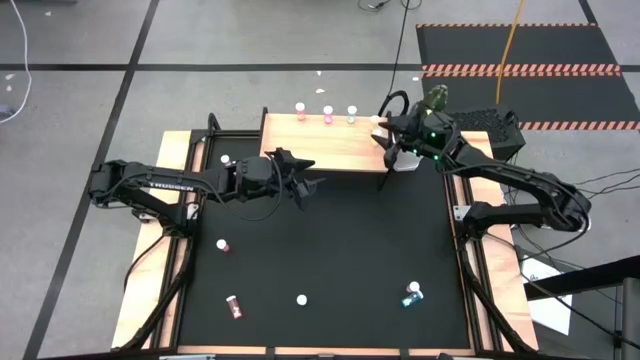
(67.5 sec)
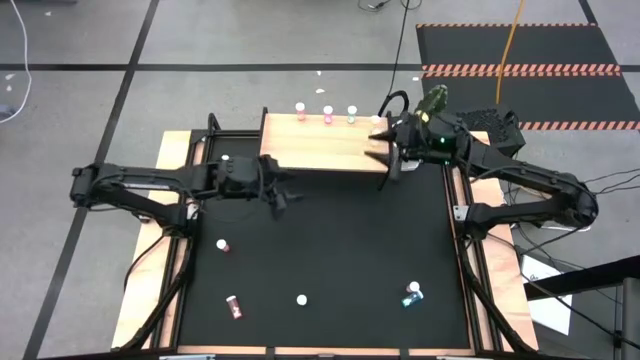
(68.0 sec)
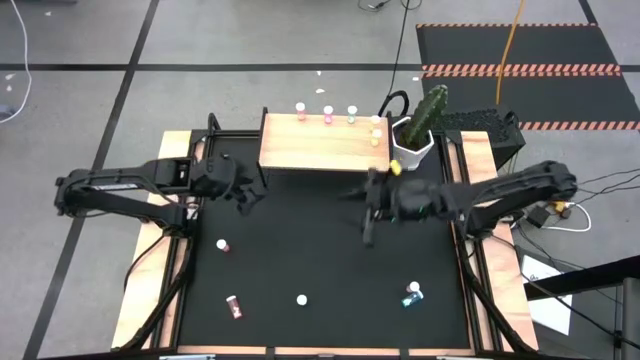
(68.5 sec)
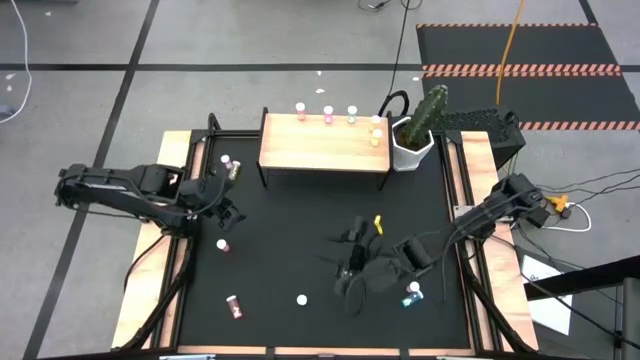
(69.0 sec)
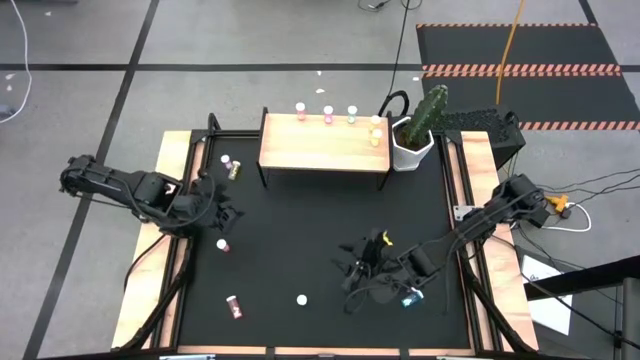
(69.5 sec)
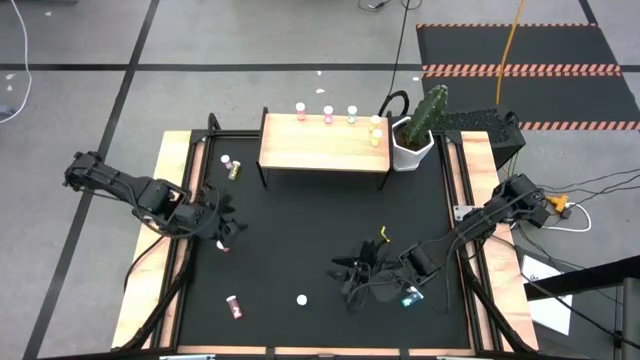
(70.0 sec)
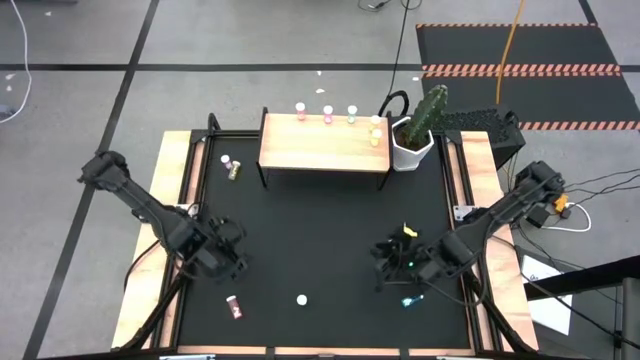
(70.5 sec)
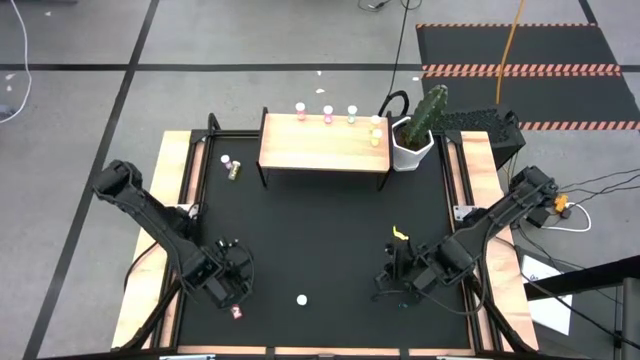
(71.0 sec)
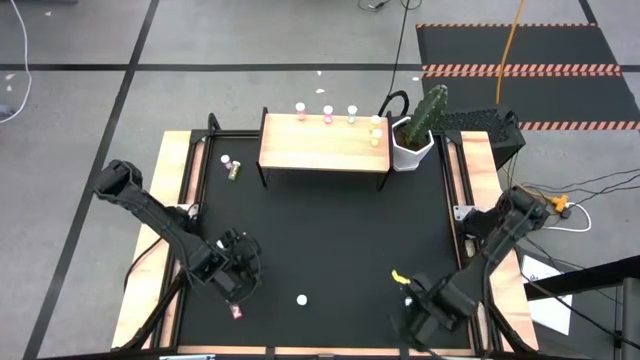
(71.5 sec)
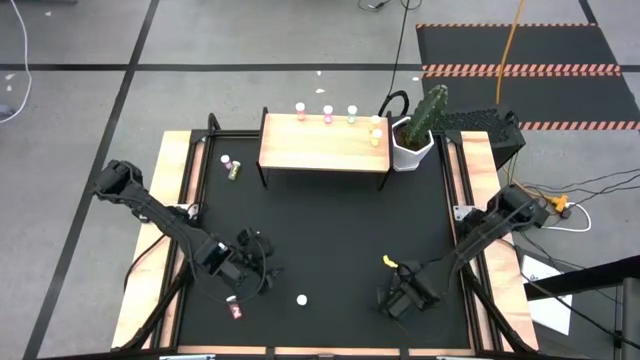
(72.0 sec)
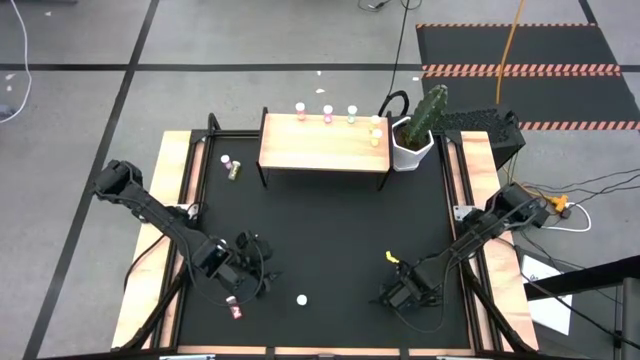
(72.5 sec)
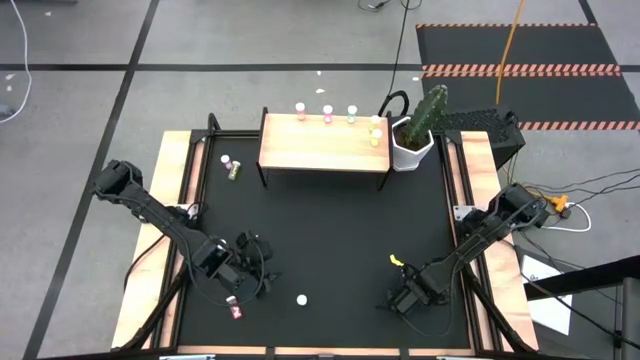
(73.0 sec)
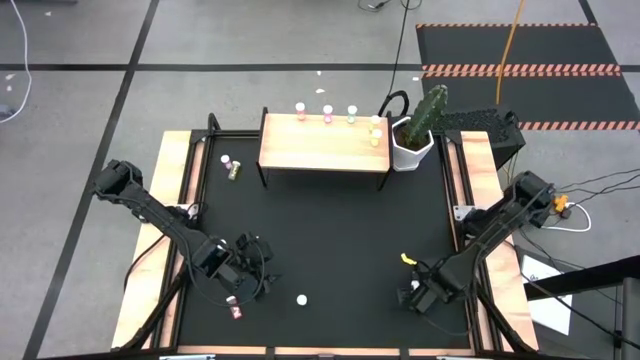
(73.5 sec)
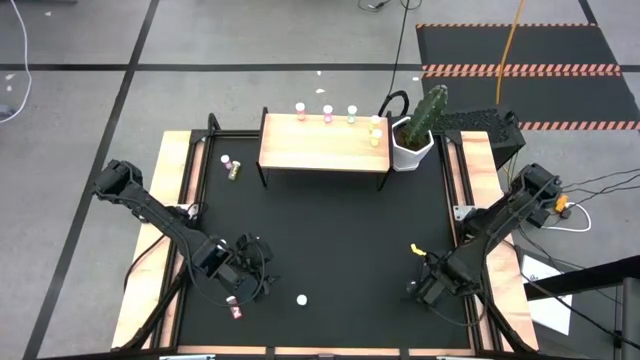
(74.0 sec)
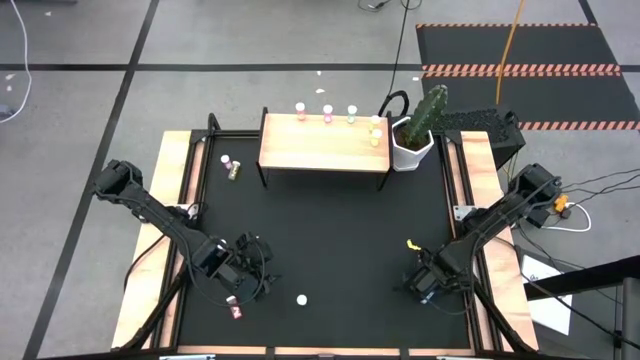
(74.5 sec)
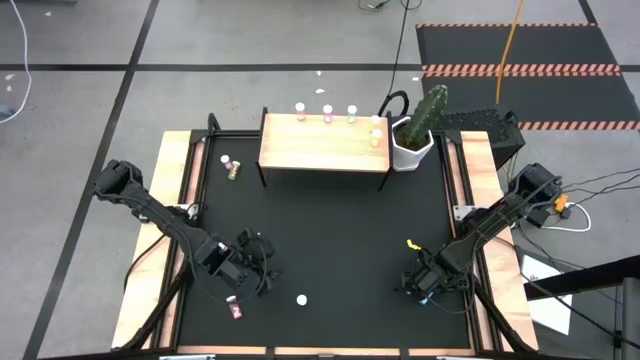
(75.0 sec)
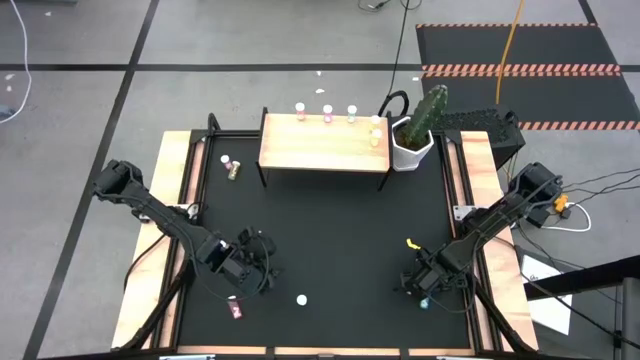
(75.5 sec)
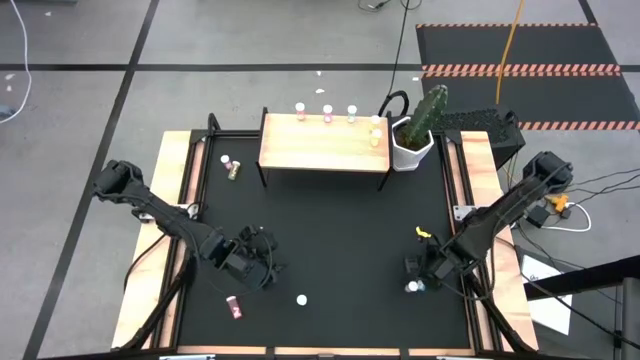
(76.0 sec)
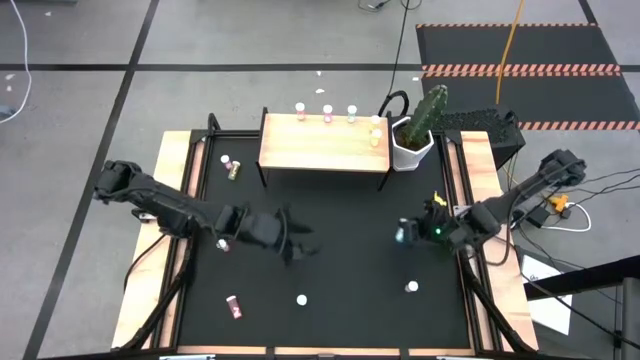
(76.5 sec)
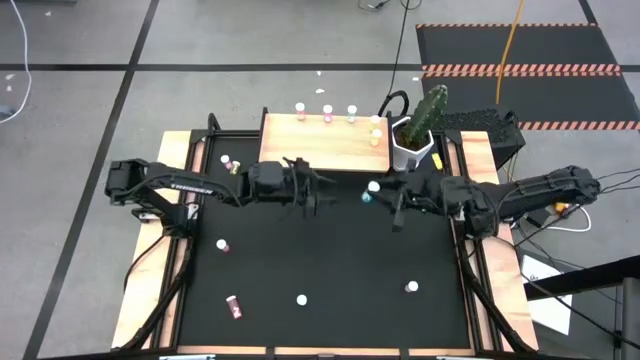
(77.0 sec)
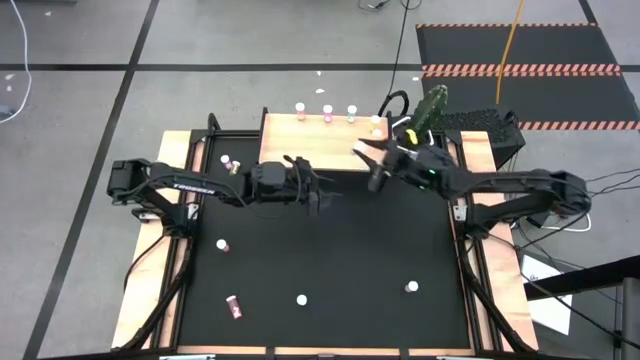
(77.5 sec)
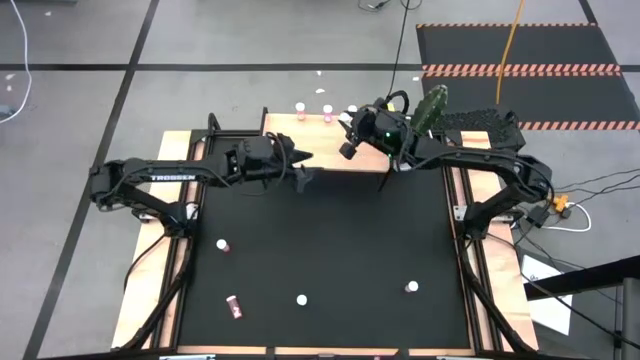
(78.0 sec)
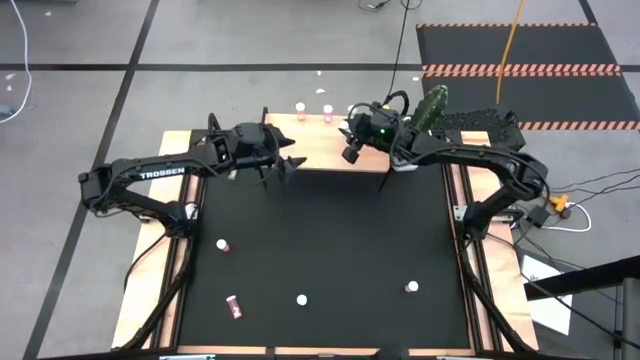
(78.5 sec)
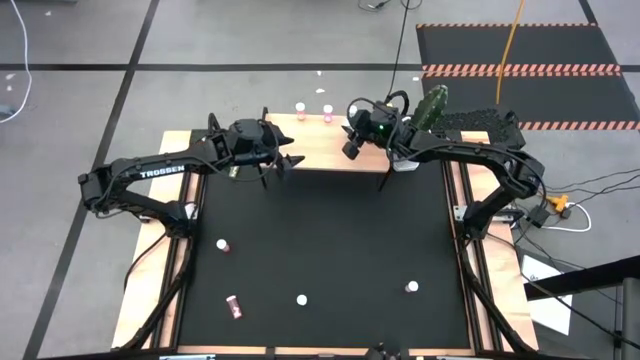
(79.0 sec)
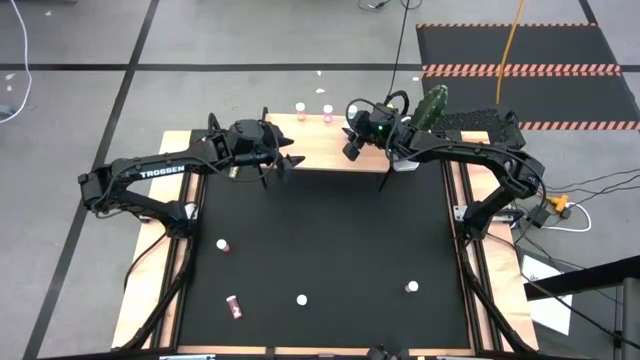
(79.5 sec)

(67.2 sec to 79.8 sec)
Task: Pick and place medicine bottles onto shelf by color
Put the right blue pill bottle on the shelf aligned with the other blue pill bottle
